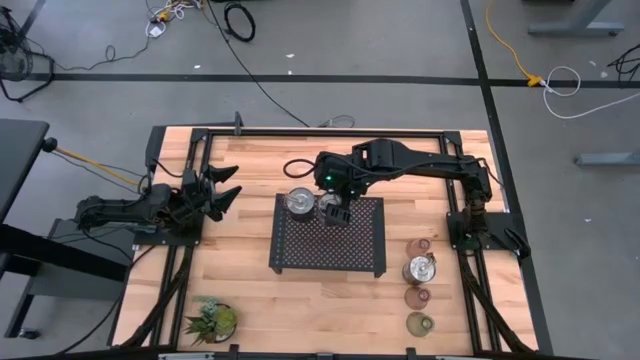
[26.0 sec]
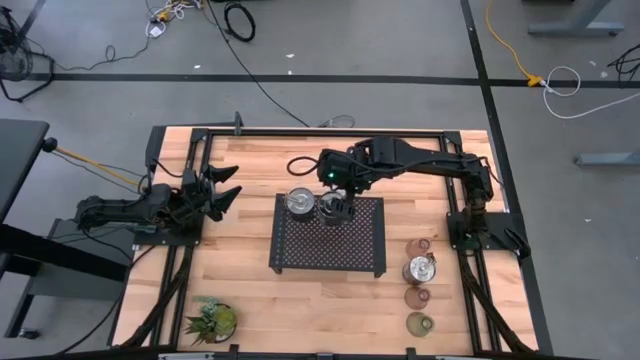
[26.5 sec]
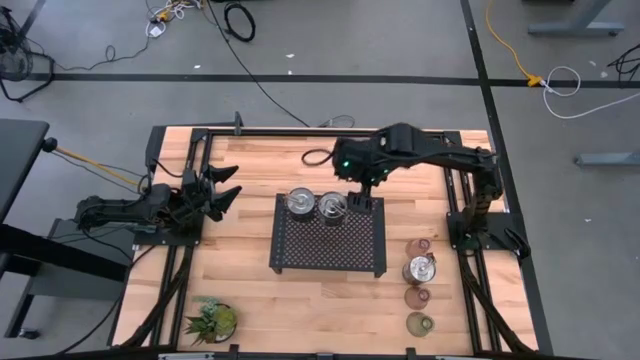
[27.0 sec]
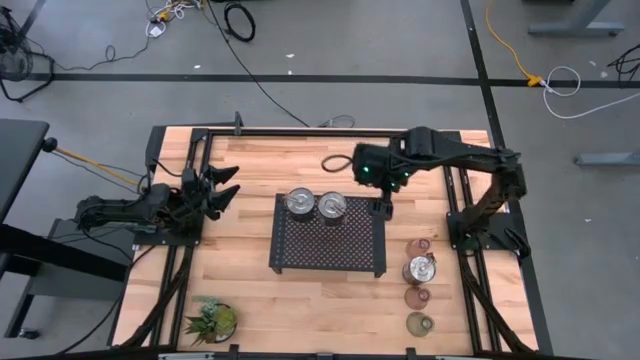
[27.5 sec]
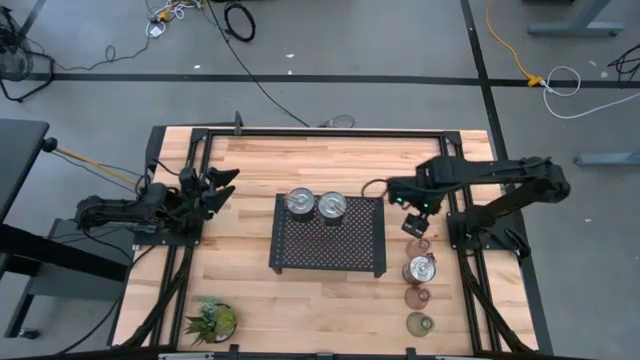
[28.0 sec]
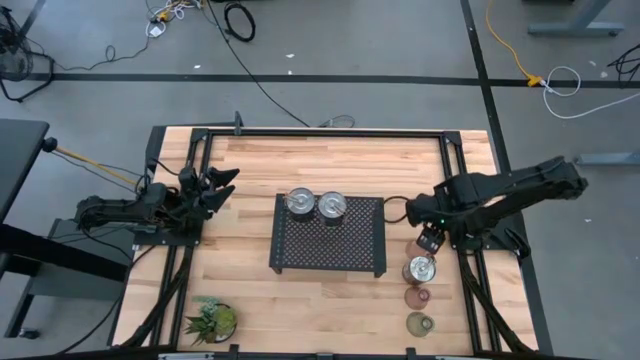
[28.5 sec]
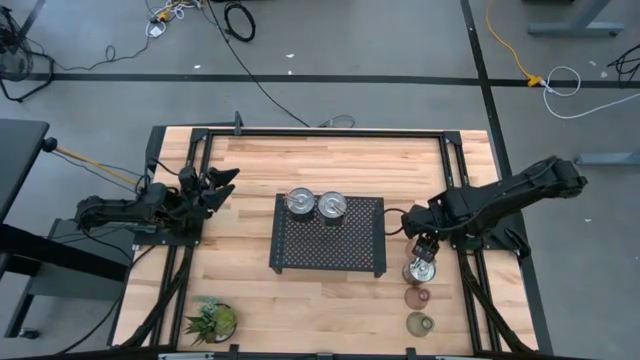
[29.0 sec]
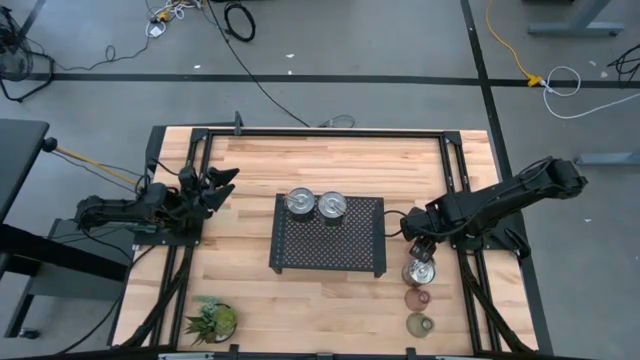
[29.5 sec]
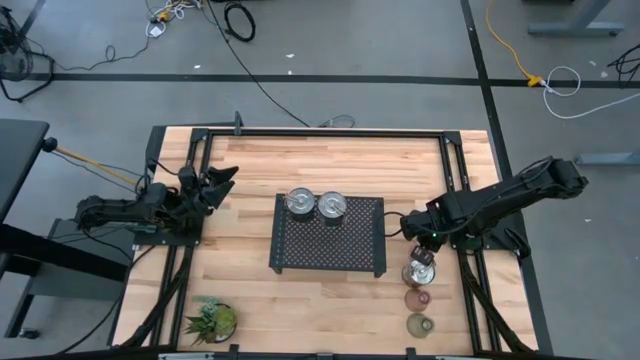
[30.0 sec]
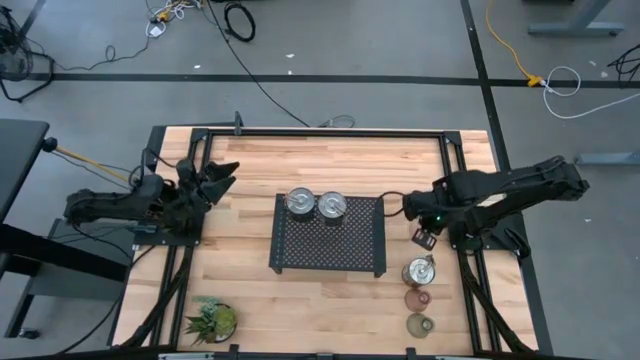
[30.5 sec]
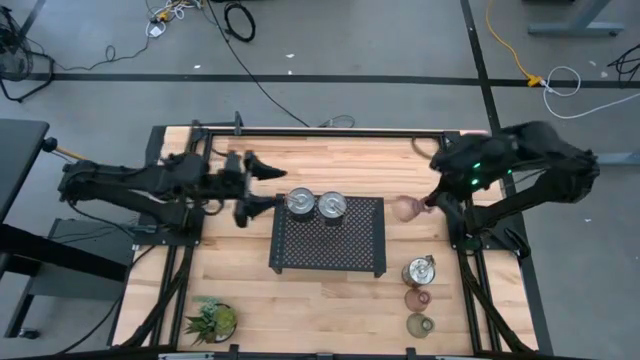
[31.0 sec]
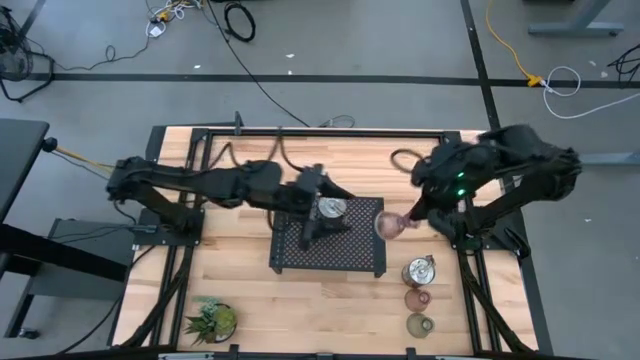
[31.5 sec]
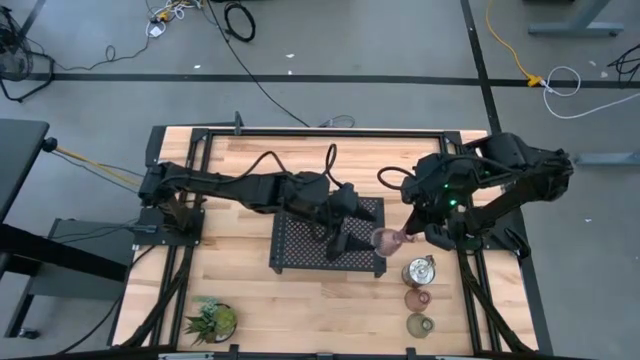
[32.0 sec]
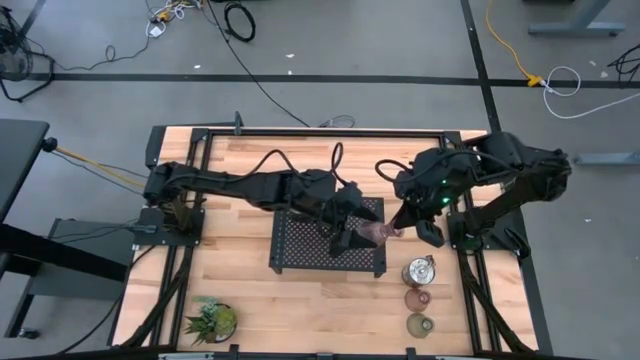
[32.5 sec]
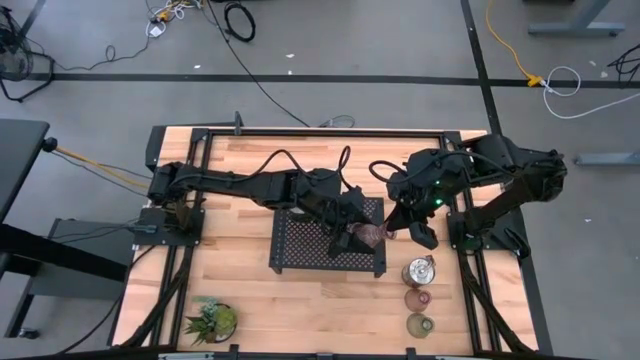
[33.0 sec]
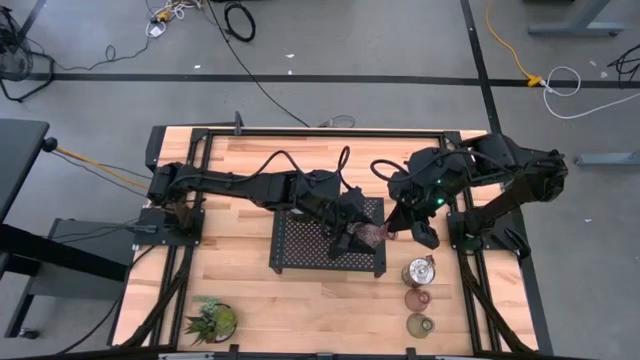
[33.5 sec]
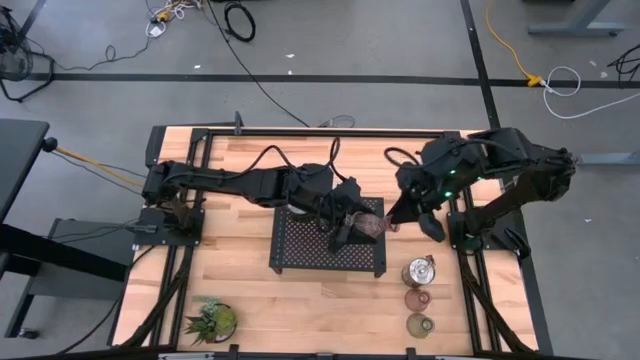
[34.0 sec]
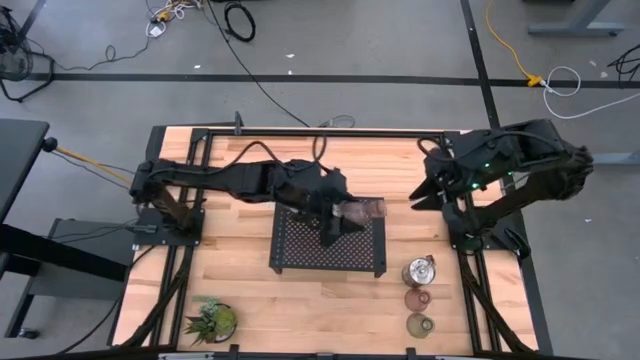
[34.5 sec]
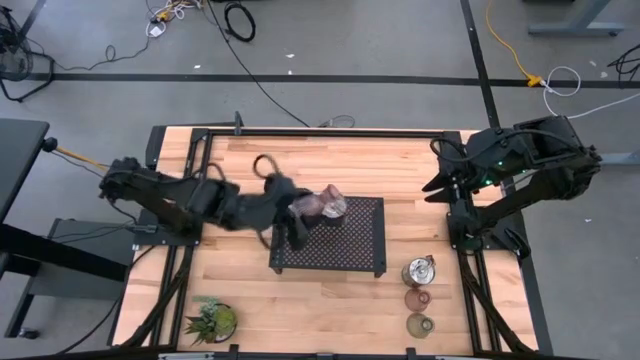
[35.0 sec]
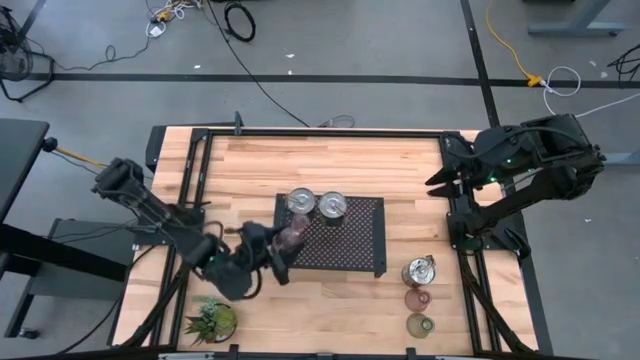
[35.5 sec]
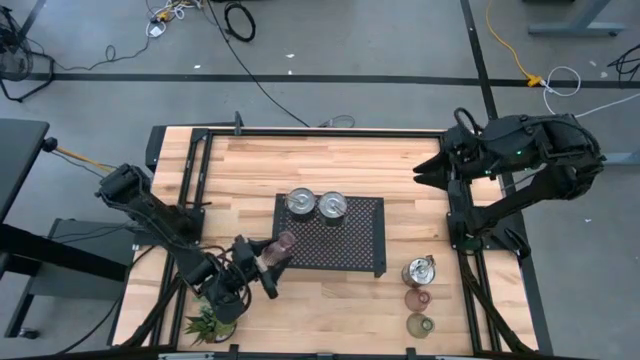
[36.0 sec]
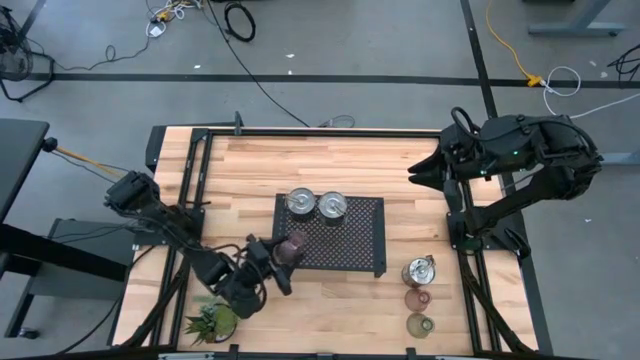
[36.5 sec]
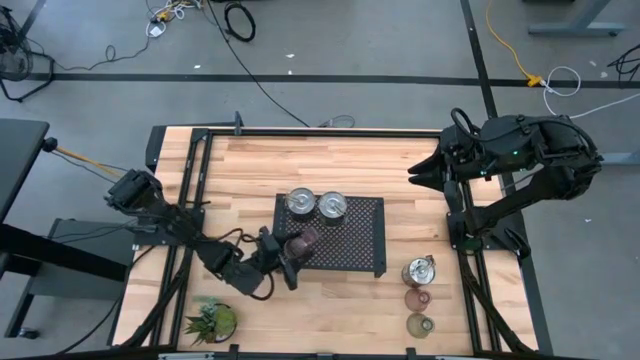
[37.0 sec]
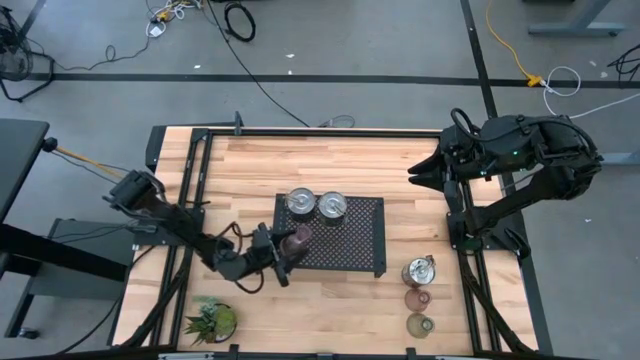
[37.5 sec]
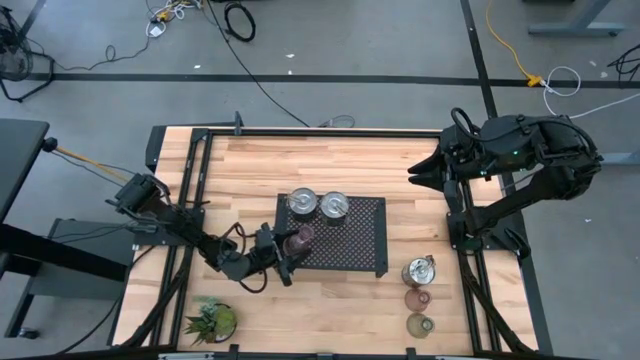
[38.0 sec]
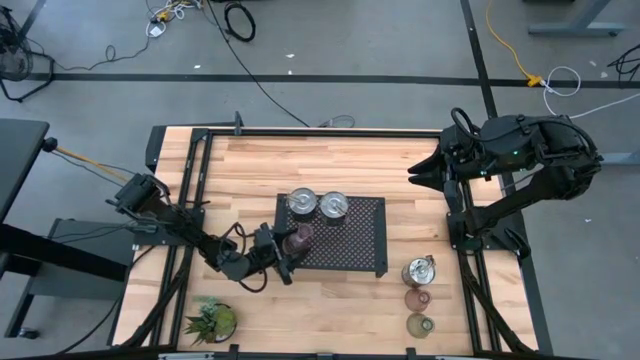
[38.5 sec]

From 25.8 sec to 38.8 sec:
Task: Pick & Place candle stick holders
Put the top pink glass candle holder on the shelf

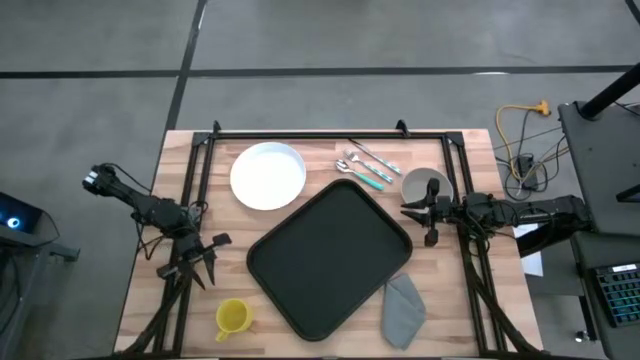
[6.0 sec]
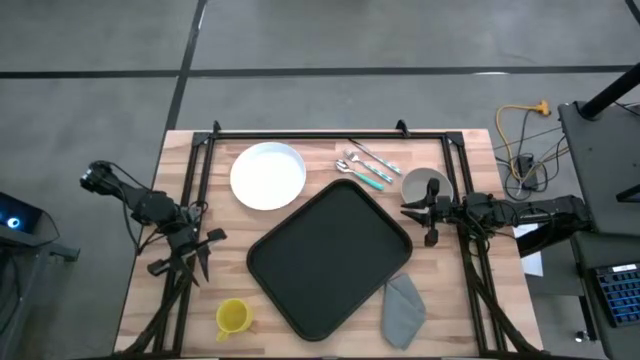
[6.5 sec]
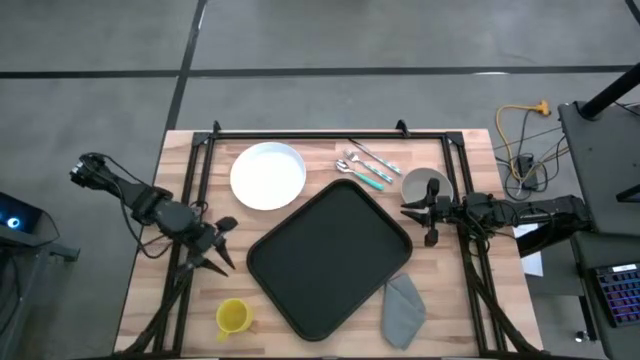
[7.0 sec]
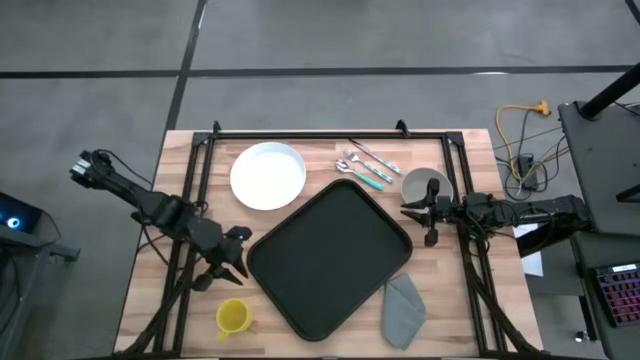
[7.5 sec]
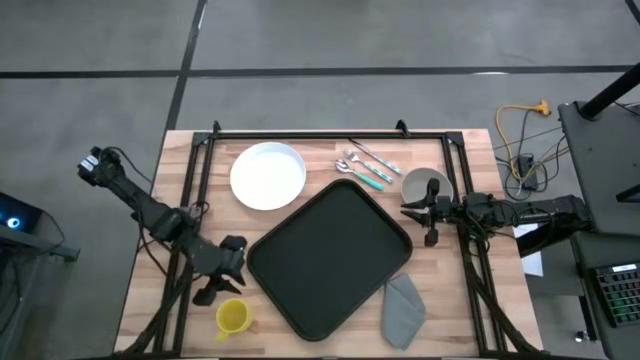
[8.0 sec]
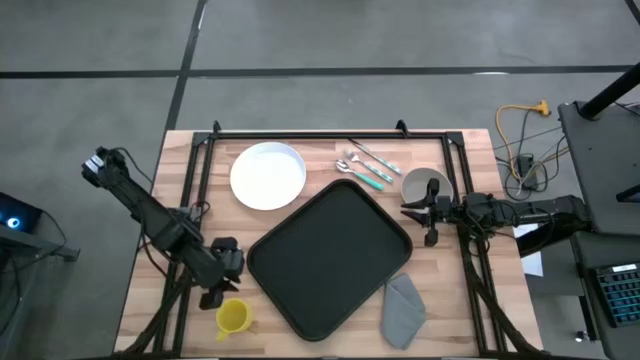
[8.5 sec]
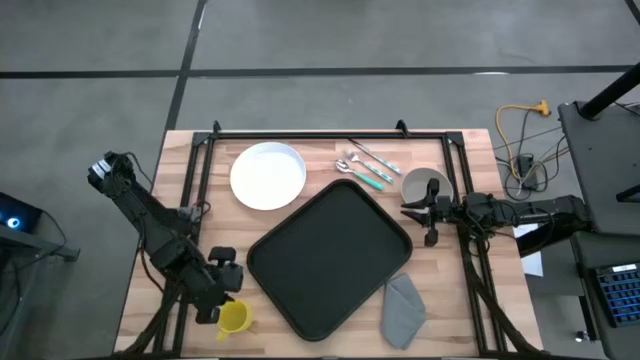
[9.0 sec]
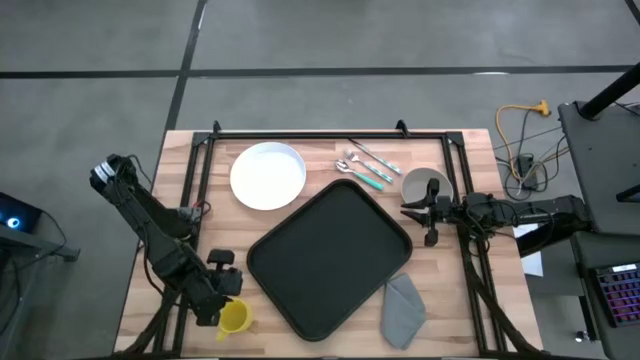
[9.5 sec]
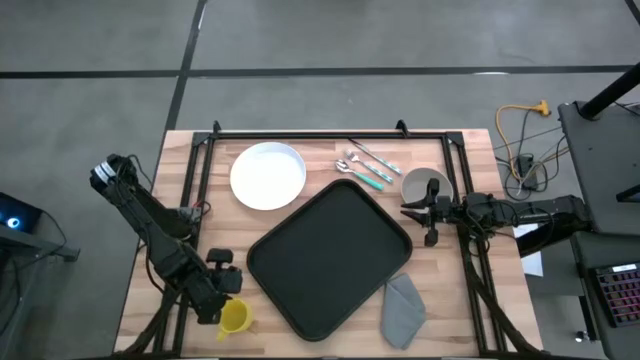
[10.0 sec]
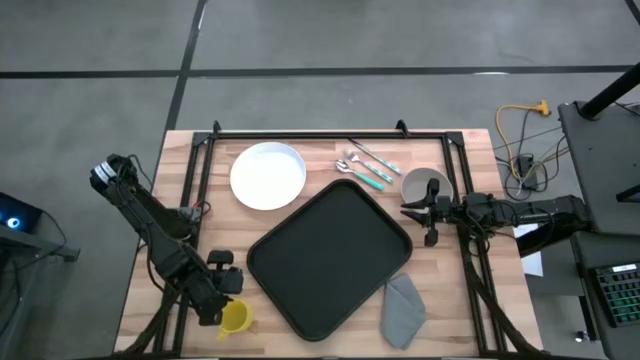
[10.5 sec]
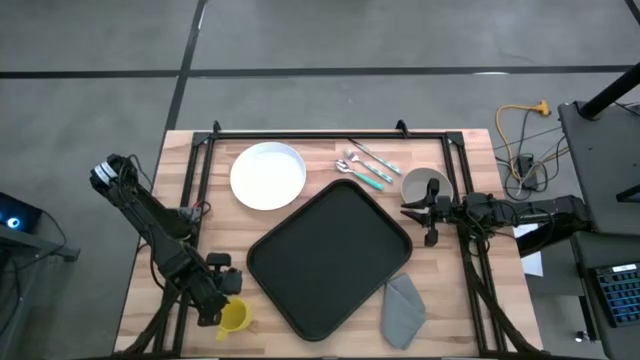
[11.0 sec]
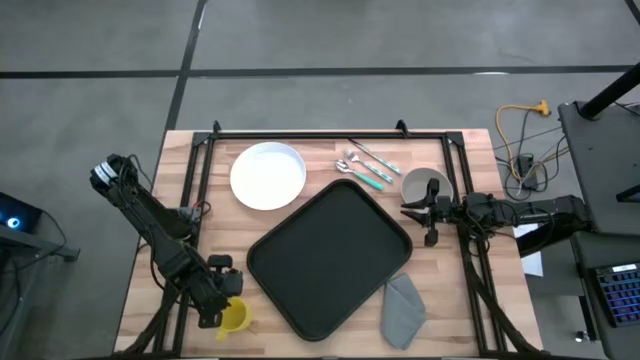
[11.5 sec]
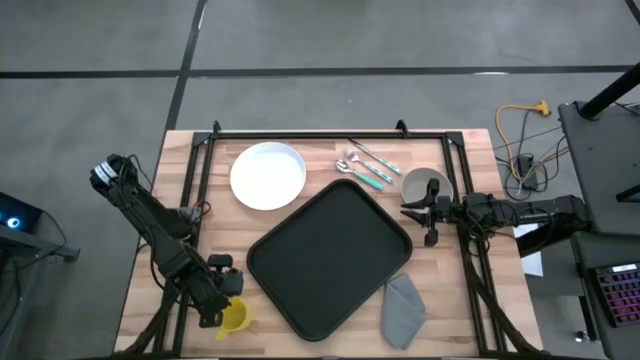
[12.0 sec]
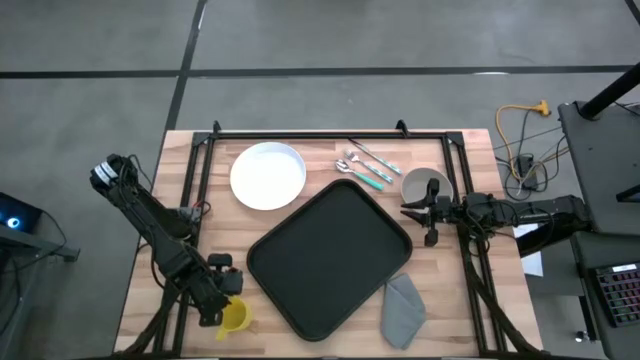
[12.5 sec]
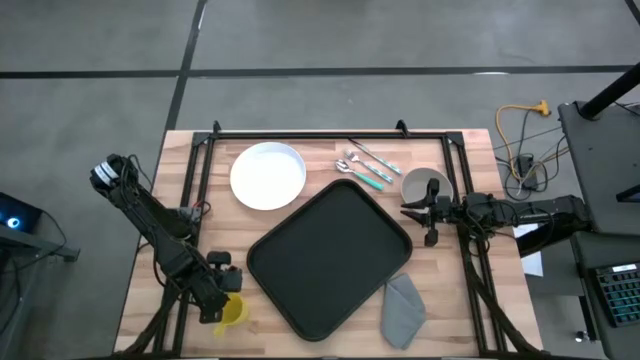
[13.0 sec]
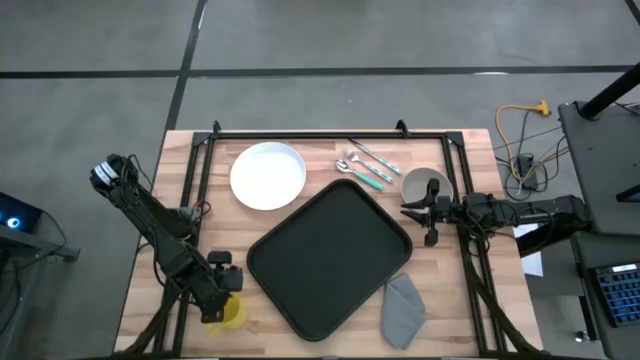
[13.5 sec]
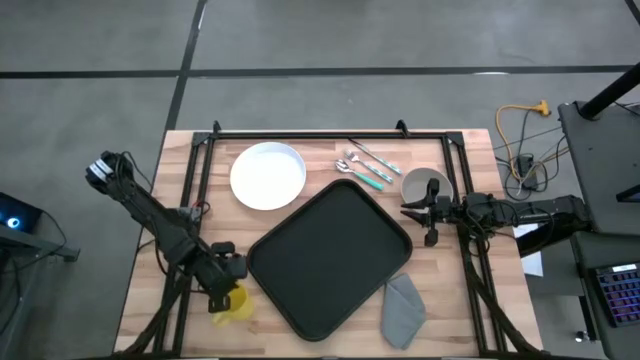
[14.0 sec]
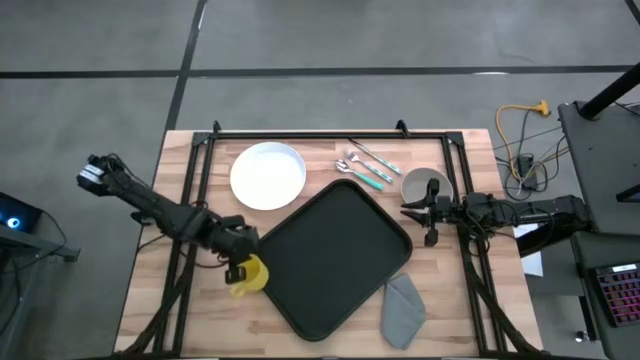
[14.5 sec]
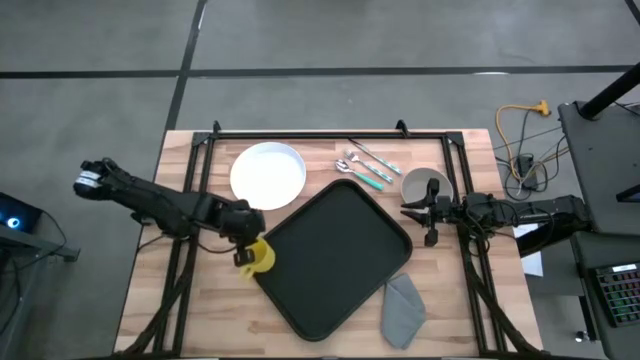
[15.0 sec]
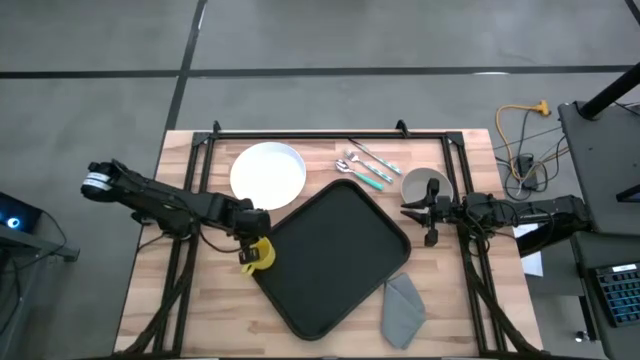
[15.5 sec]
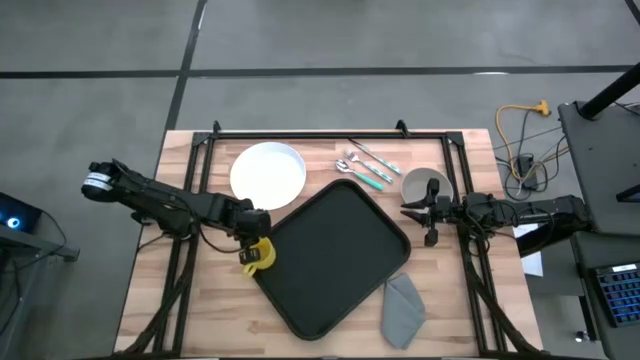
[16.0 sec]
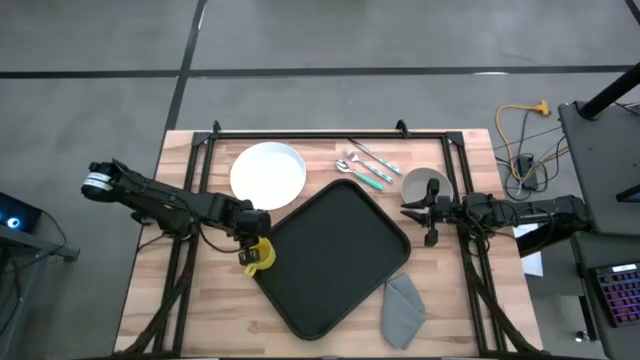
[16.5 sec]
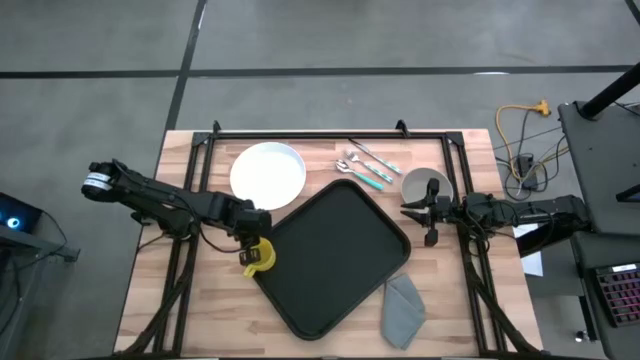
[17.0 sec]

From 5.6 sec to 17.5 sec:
Task: Set up tray
Put the yellow cup on the black tray
